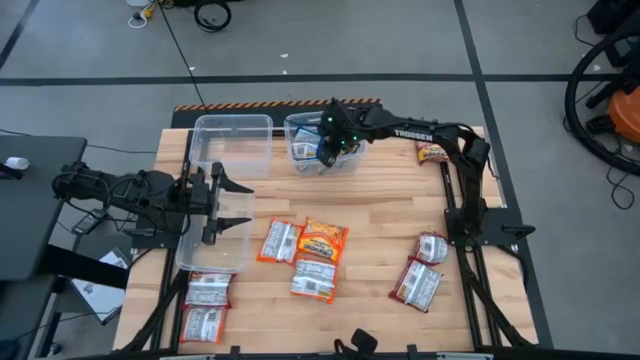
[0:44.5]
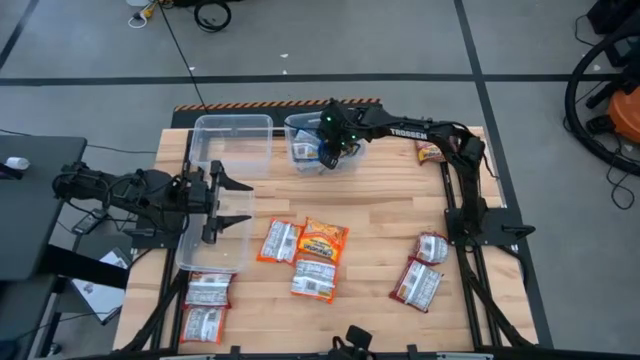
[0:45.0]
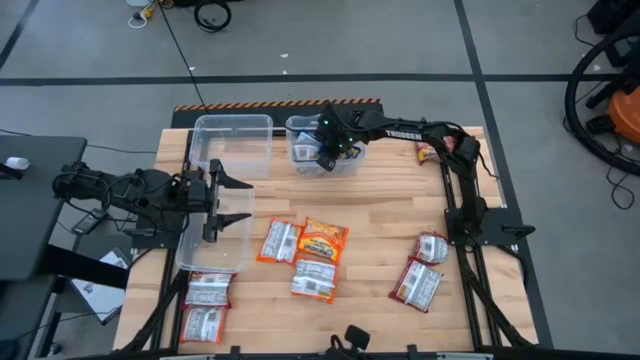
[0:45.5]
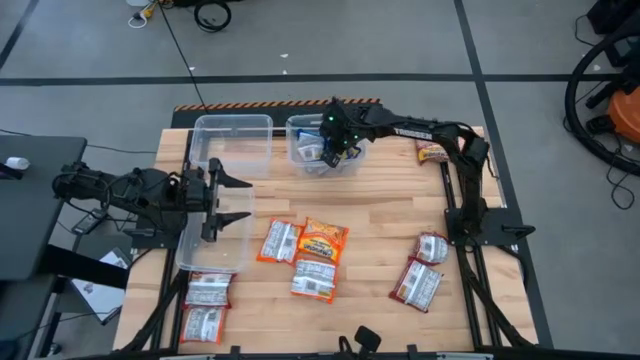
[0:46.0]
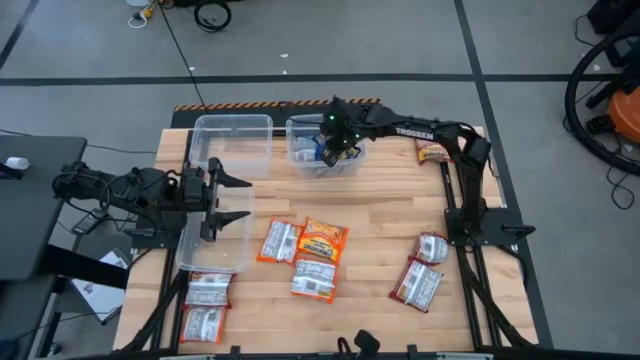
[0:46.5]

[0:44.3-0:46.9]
Task: Sort Maruchan noodles
Adjust the blue noodle packs into the top right transparent bin

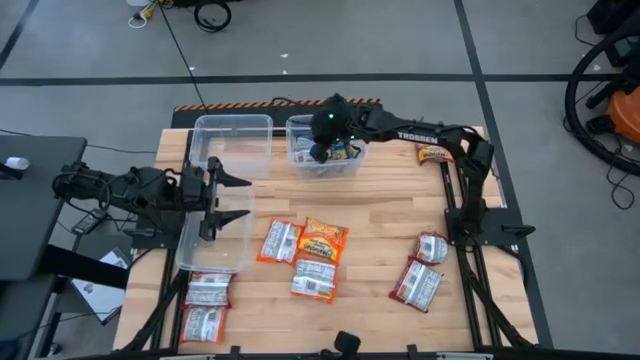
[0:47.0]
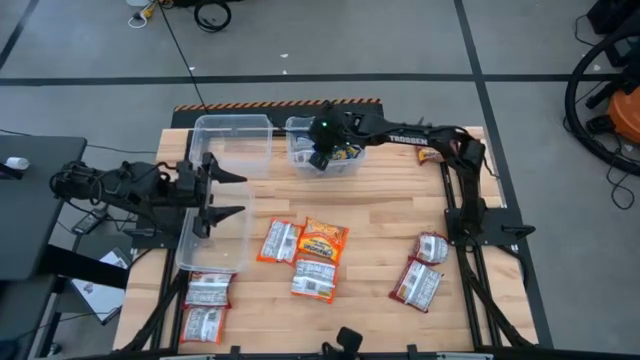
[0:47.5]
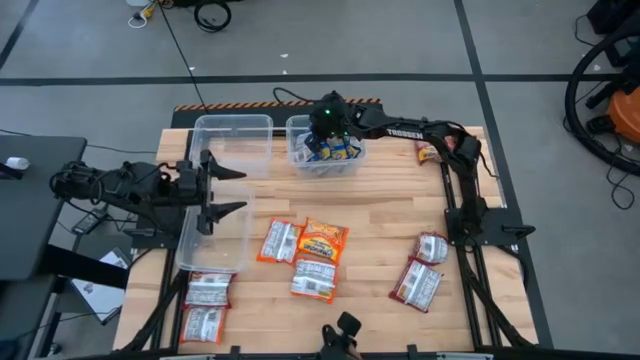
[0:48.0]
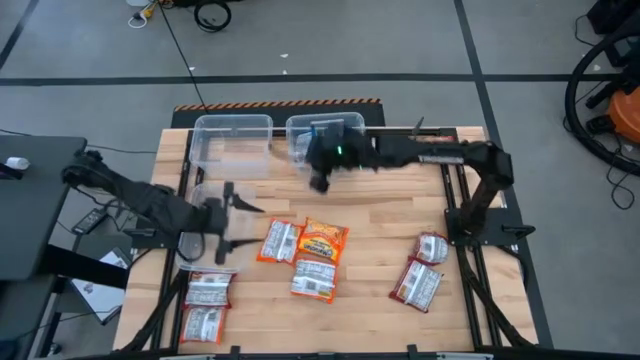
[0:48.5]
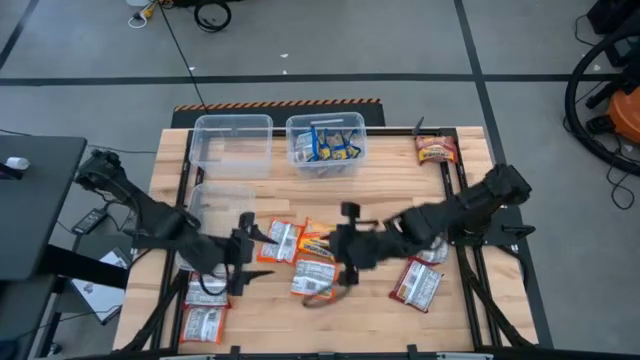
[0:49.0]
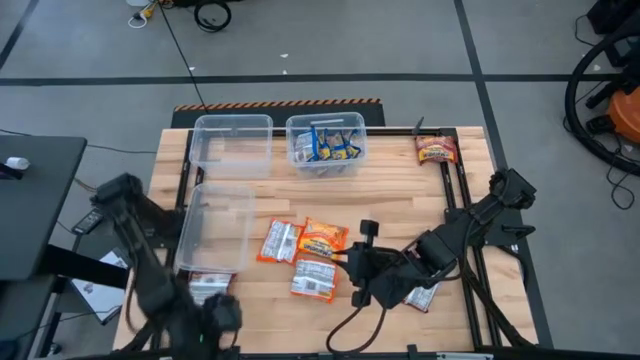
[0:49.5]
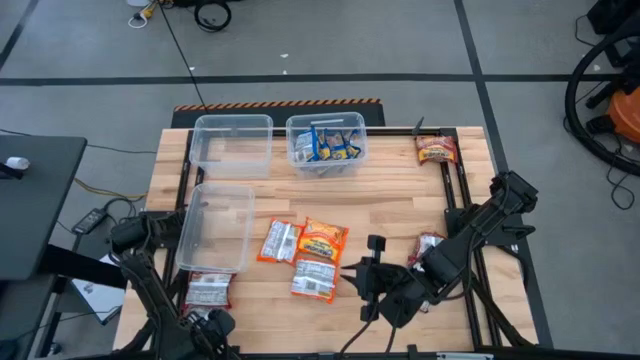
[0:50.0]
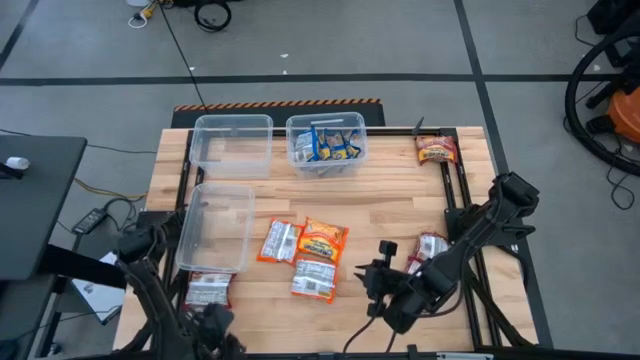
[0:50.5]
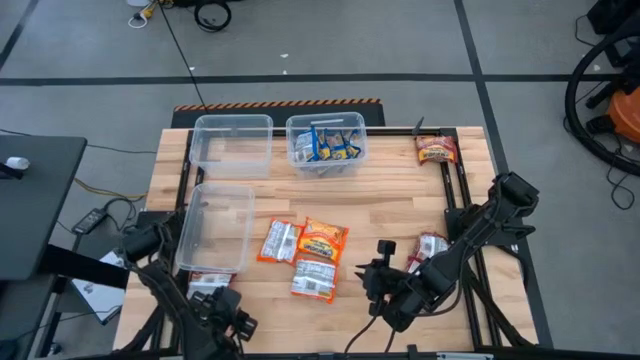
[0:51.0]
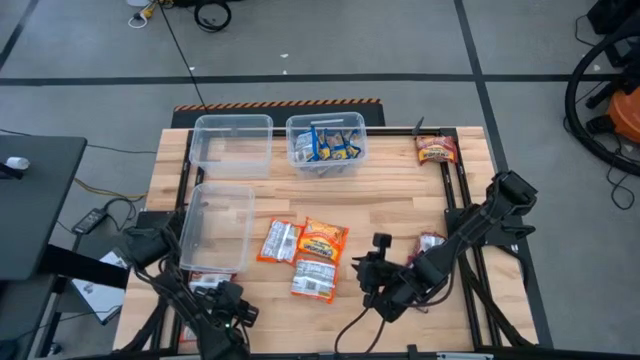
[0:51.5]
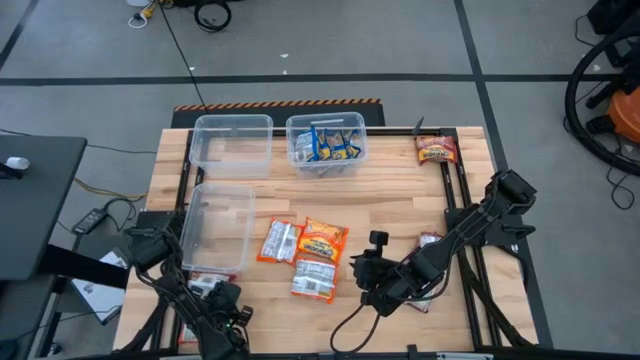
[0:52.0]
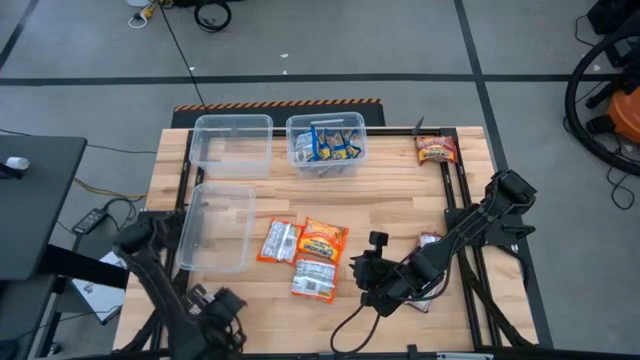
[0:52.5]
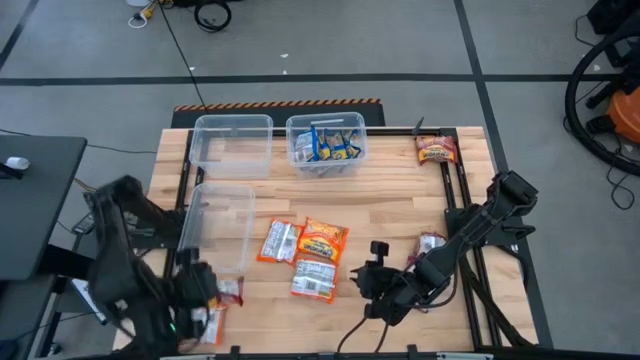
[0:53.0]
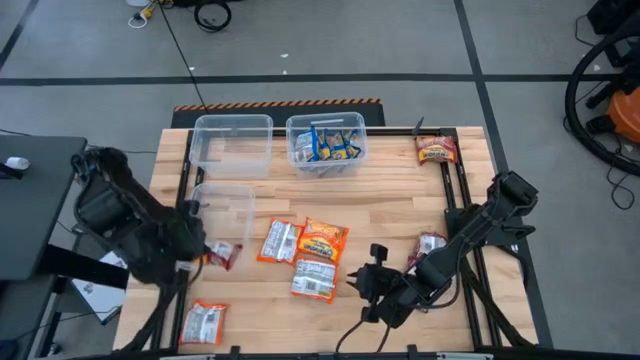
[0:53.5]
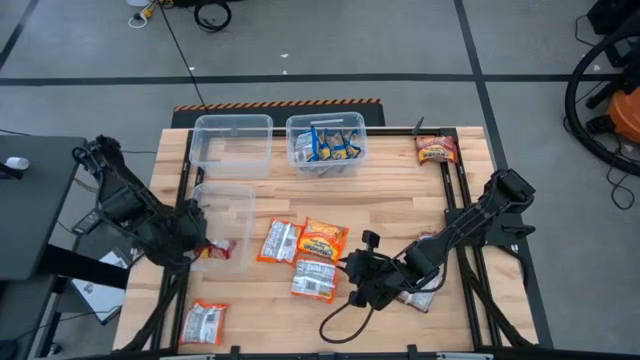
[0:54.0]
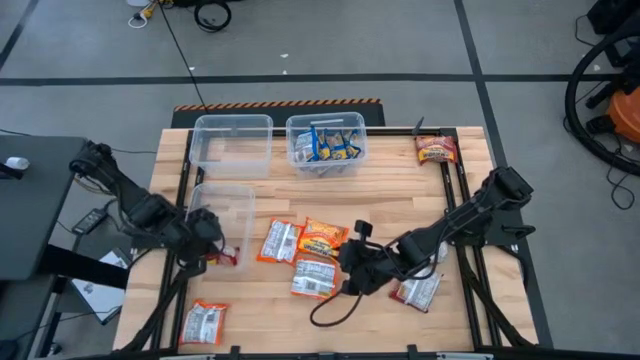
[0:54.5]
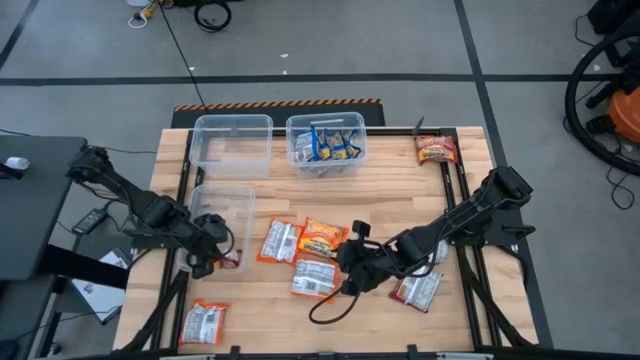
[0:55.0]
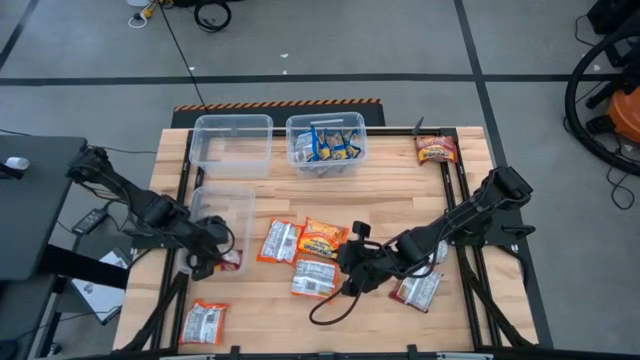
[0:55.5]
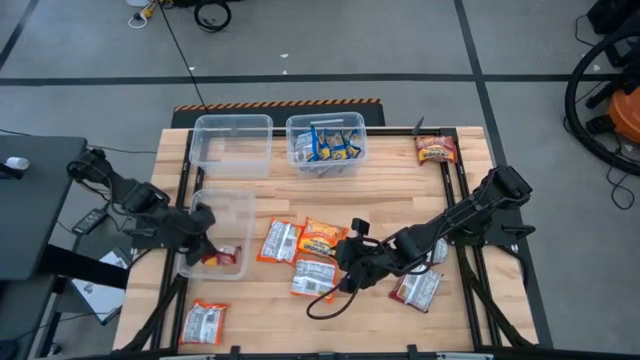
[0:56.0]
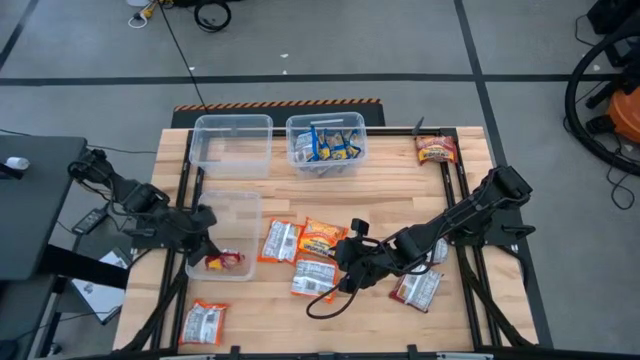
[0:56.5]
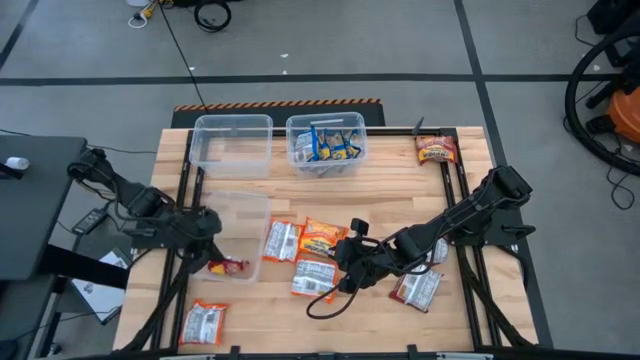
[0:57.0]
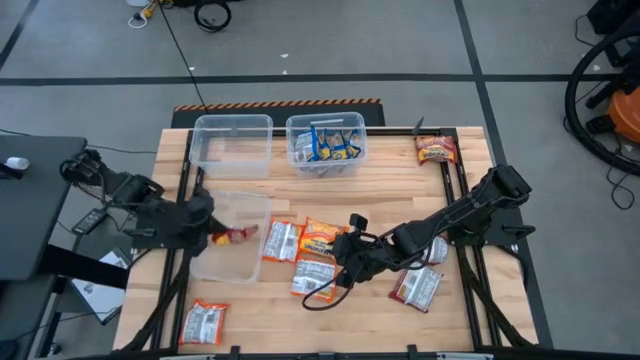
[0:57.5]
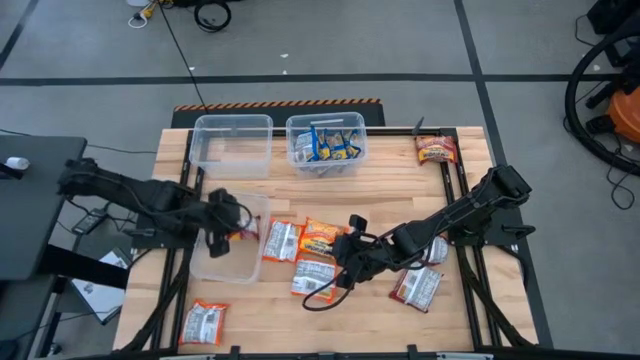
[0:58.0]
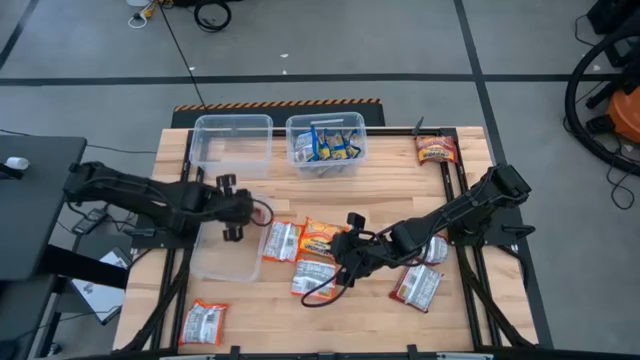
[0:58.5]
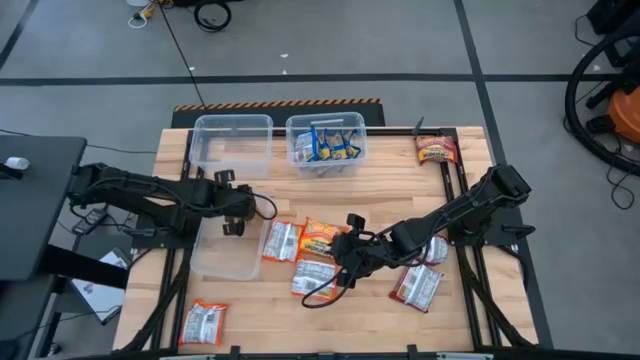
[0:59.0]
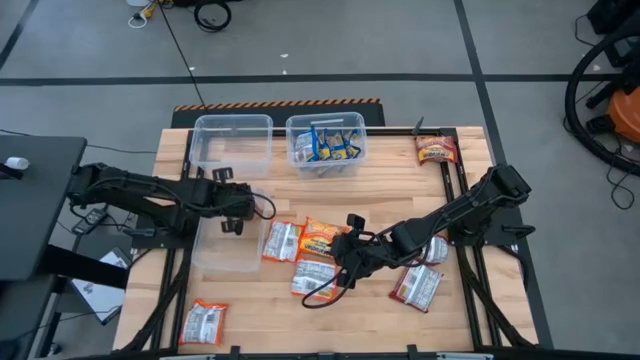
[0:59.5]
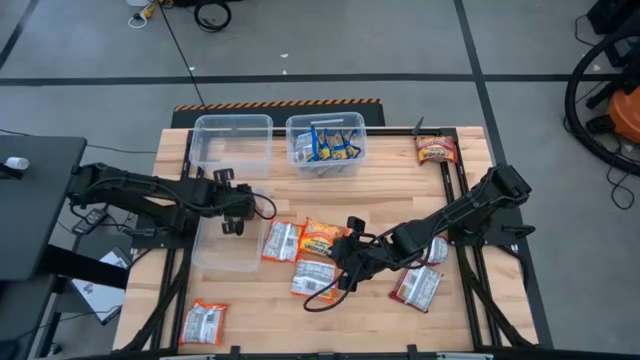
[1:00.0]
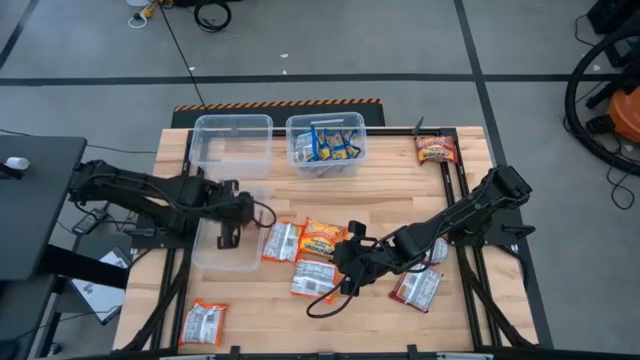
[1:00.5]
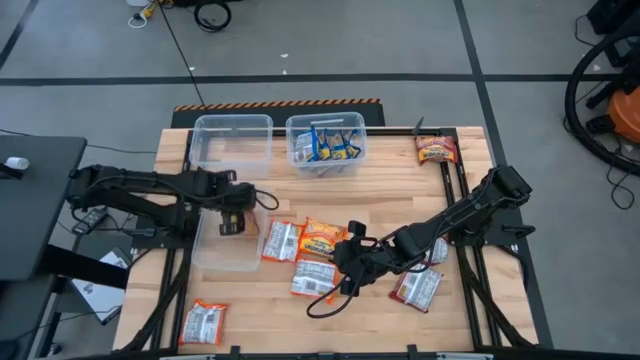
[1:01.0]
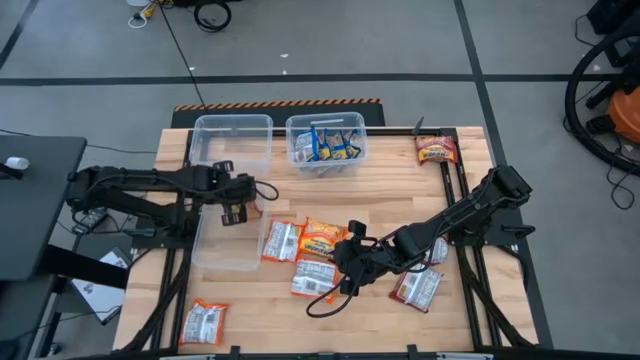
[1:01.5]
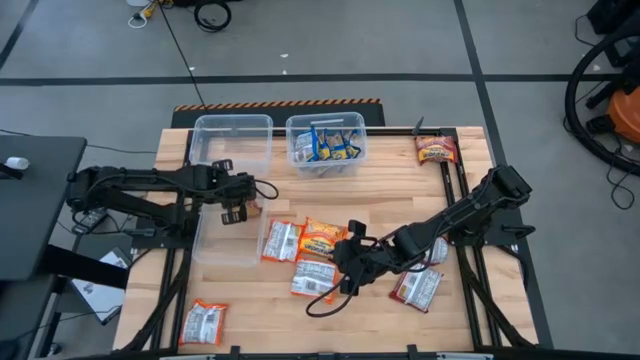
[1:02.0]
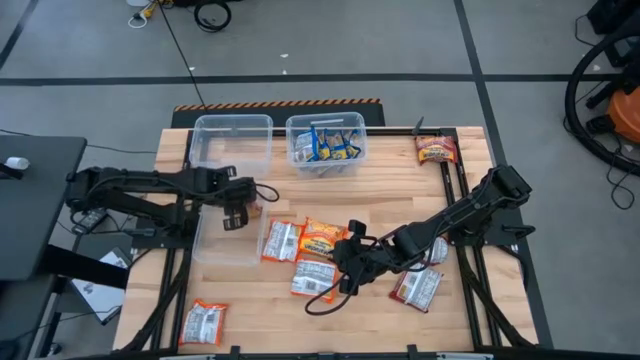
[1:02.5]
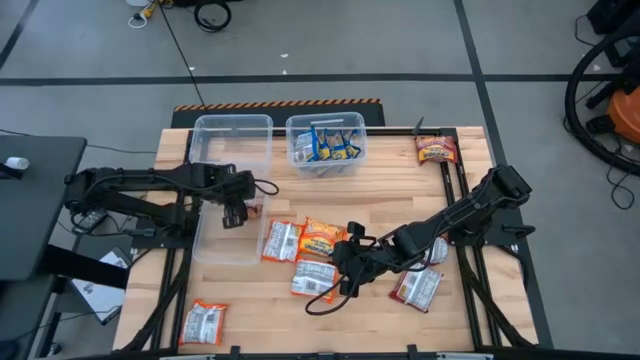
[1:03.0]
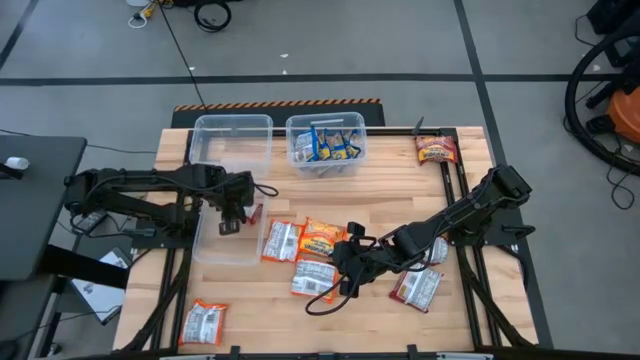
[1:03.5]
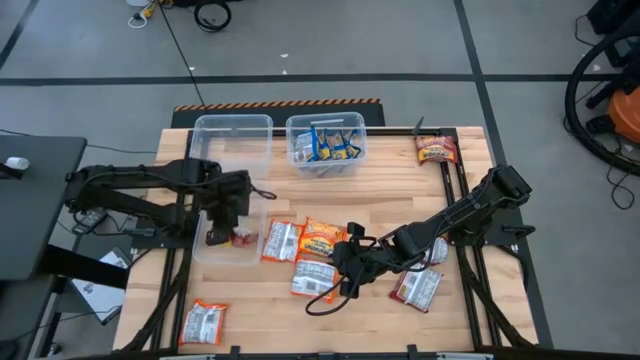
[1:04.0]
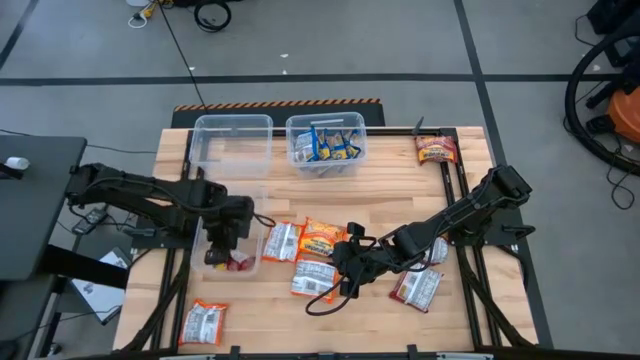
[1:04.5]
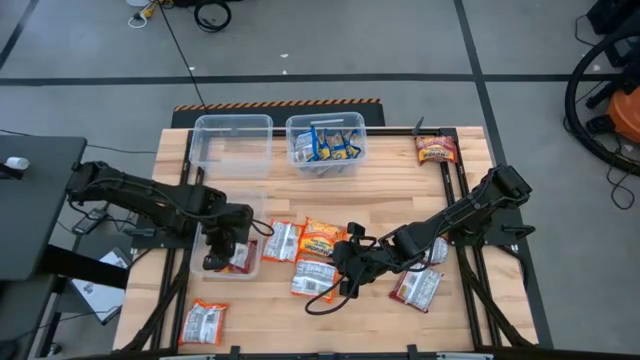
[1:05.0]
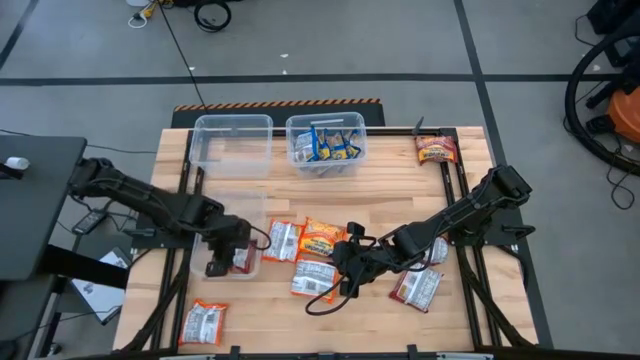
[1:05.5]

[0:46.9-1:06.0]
Put the bottom right red noodle pack into the bottom left transparent bin
